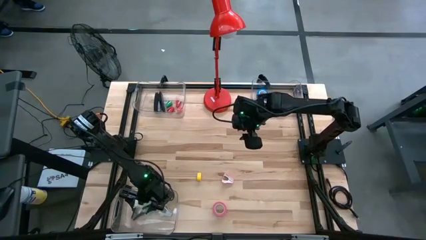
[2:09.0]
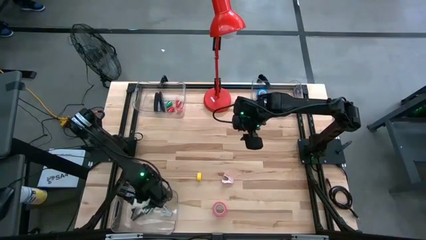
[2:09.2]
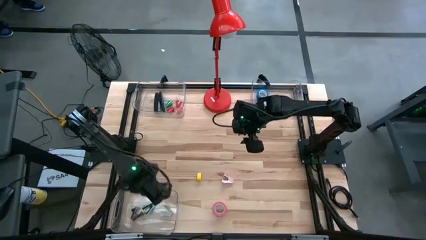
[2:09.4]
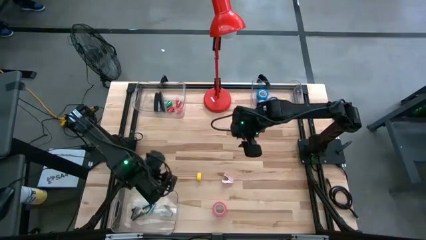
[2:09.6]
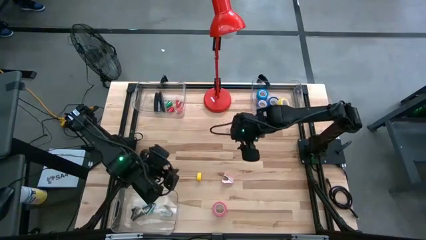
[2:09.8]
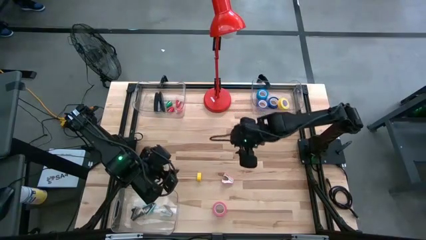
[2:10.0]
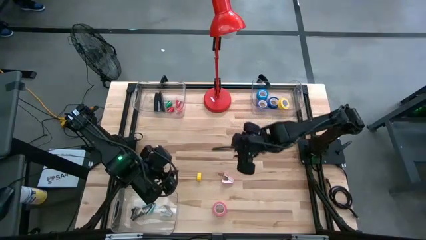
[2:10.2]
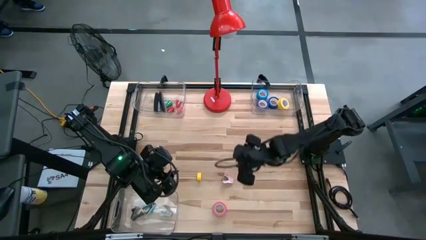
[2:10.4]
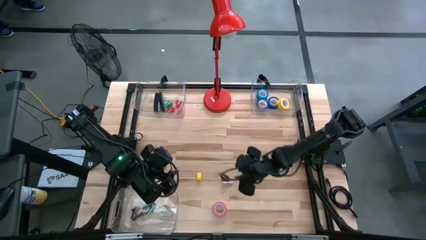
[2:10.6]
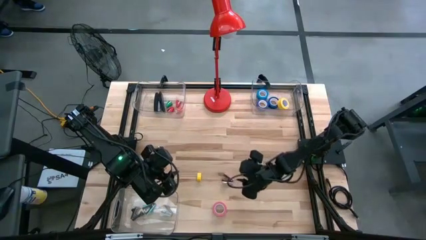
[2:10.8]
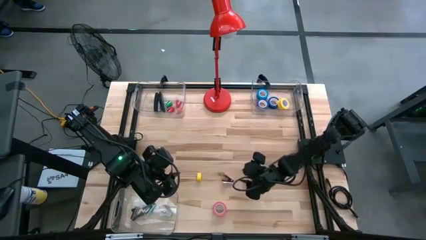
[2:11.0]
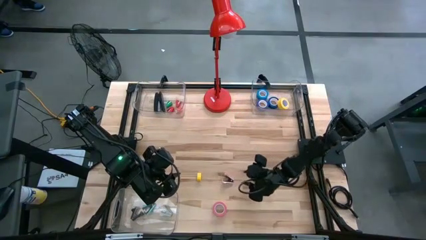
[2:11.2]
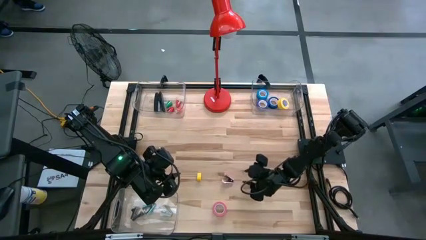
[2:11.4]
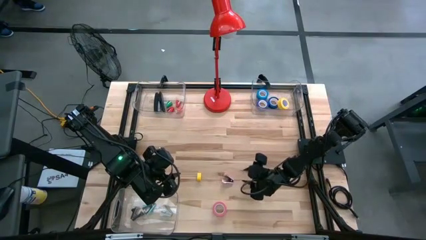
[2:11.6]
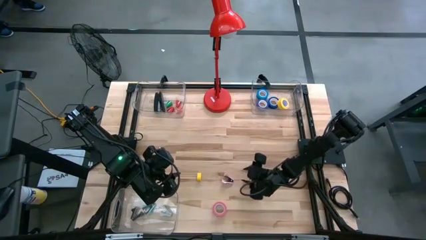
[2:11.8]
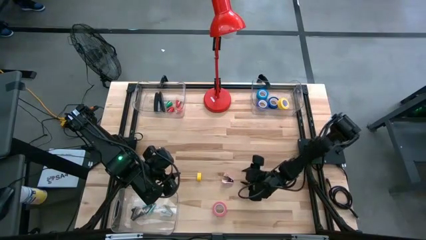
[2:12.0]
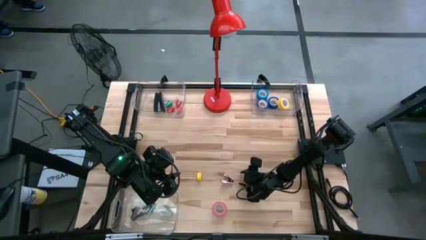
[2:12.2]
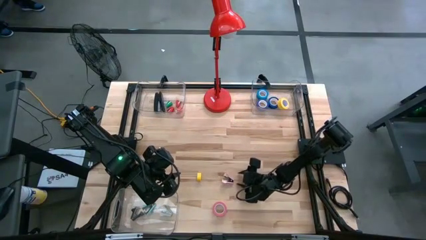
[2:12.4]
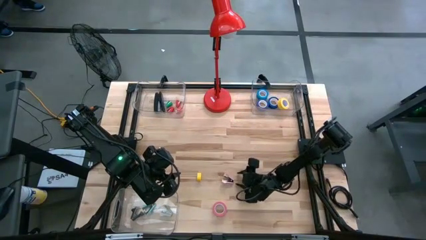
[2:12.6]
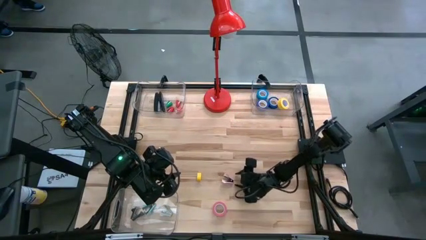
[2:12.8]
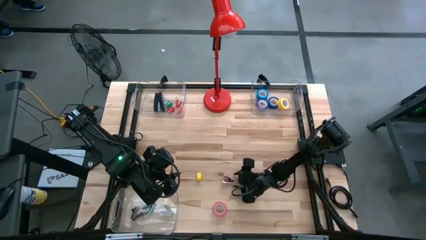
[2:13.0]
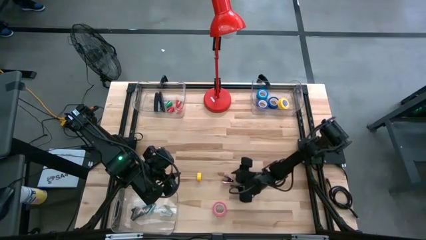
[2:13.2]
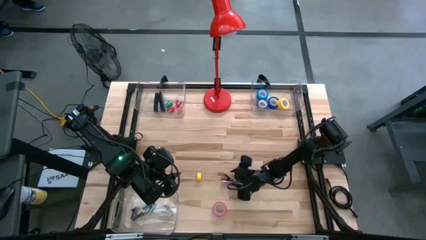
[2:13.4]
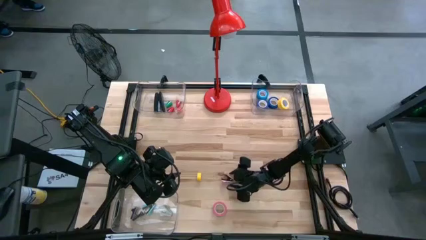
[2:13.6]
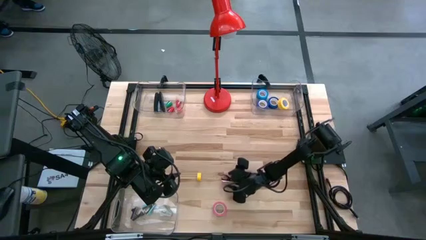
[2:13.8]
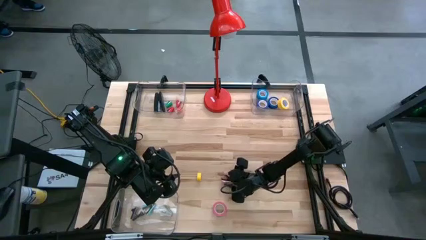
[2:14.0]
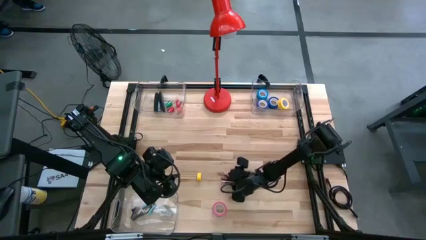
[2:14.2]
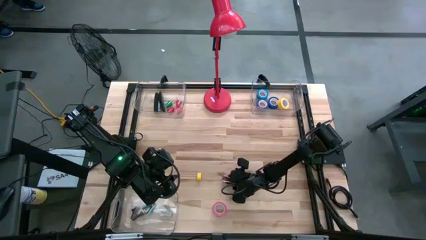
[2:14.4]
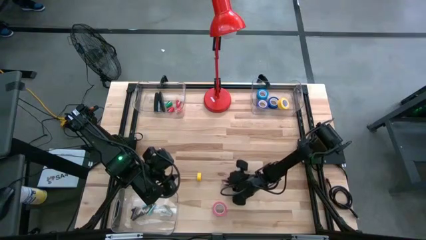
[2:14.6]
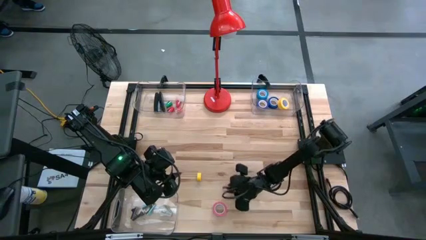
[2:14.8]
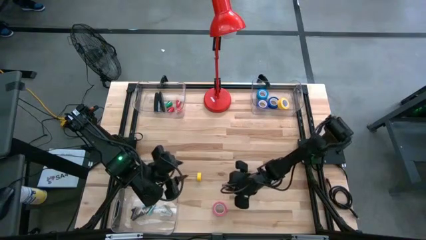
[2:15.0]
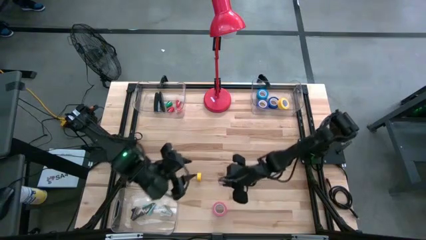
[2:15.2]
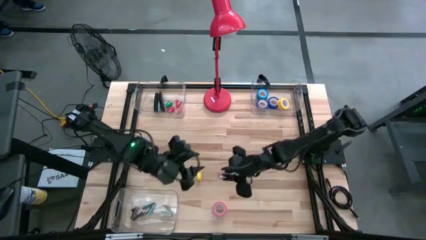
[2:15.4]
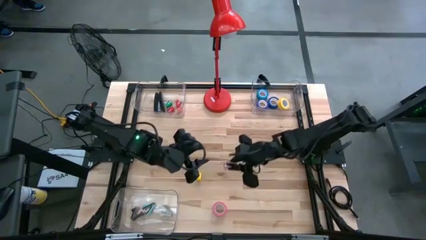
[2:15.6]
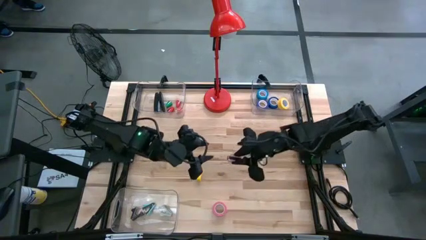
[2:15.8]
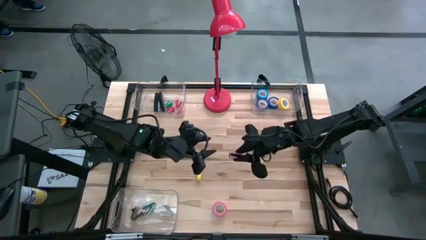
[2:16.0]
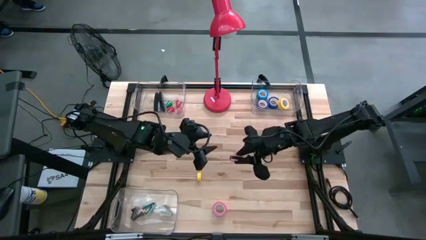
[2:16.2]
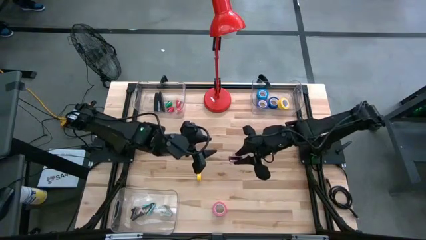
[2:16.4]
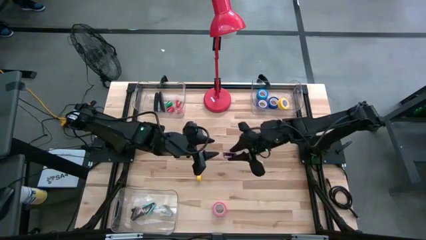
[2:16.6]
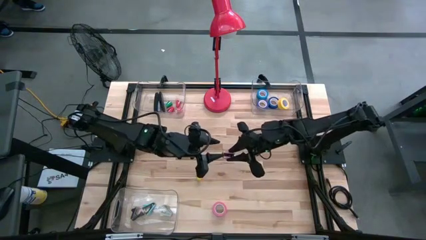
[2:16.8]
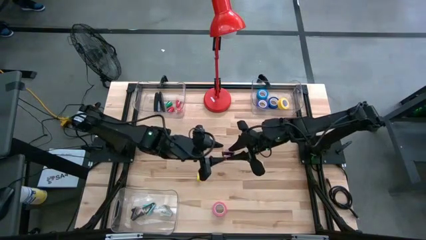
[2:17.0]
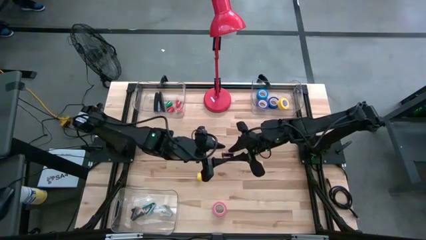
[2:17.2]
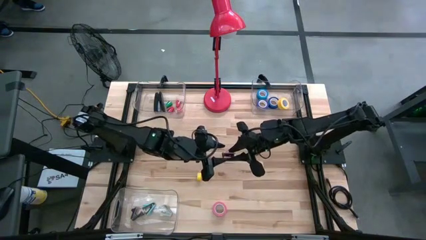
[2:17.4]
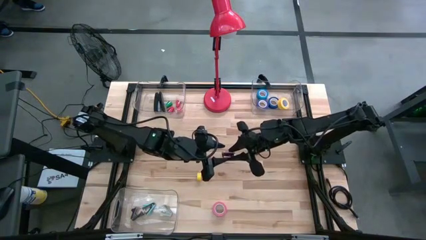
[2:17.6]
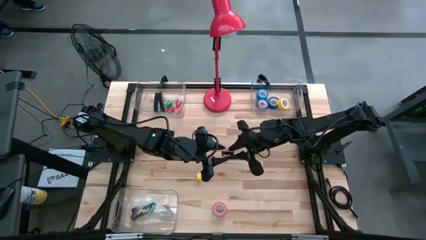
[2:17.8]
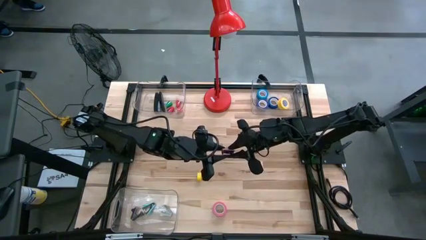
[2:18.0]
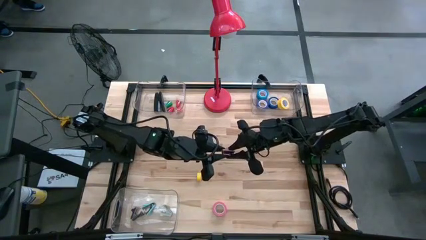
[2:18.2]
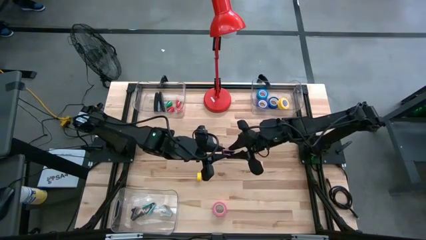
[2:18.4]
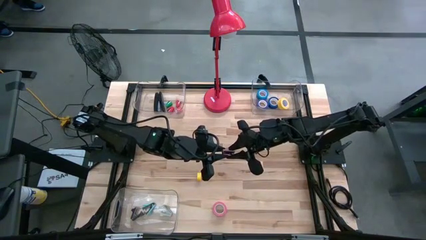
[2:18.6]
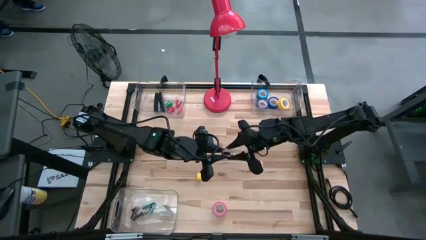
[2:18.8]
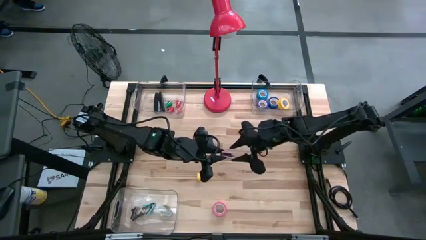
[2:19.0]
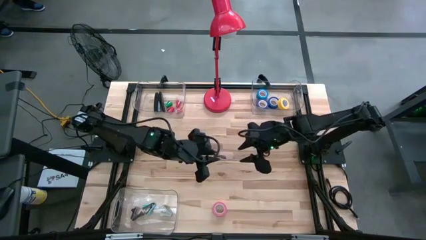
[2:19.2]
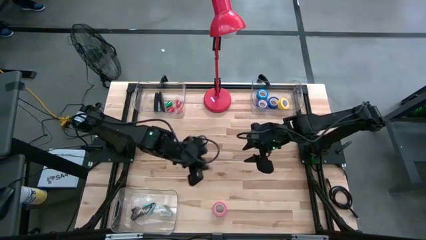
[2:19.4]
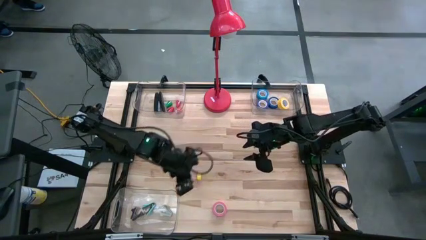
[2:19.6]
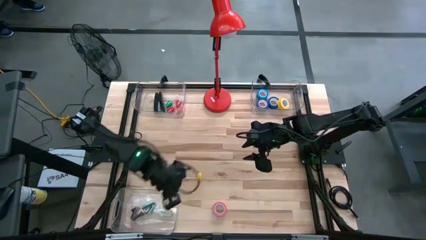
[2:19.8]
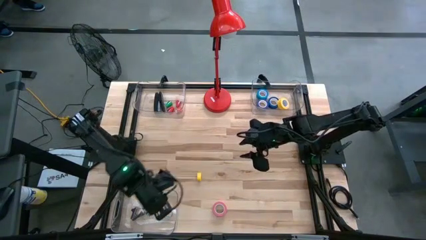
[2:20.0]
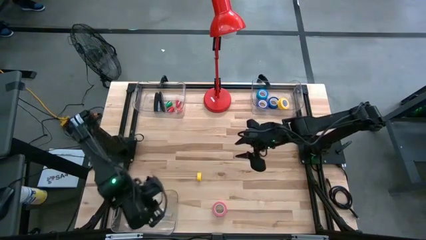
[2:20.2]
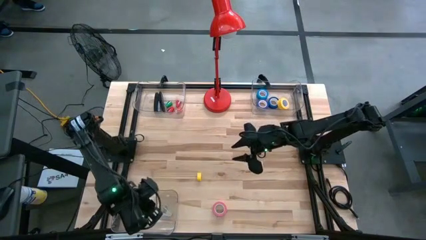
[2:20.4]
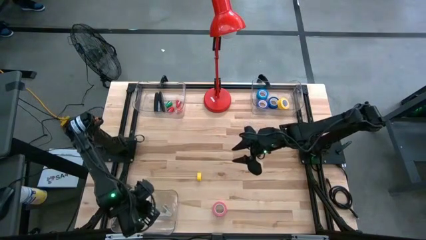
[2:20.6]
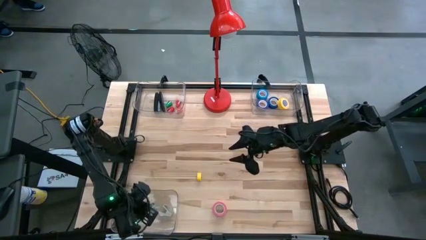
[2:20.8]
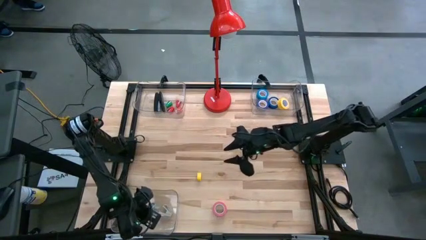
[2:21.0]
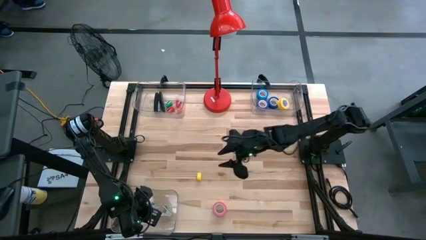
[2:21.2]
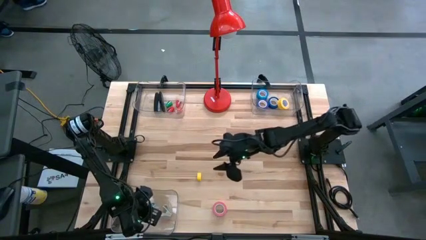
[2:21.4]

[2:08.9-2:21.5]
Task: Pick and place Stapler, Stapler remover, tape
Put the pink stapler remover into the bottom transparent bin

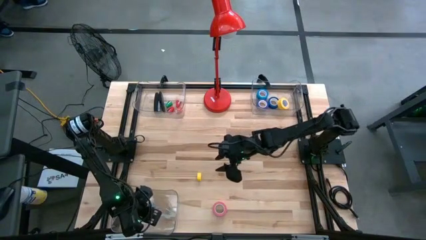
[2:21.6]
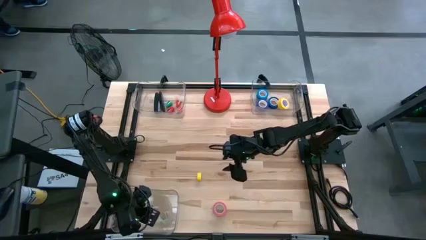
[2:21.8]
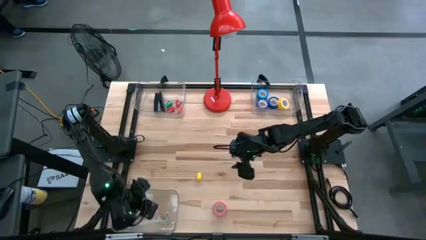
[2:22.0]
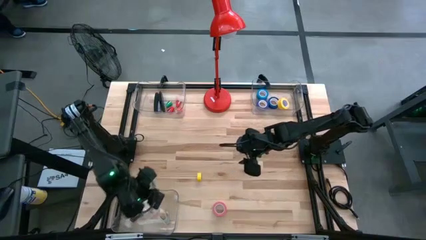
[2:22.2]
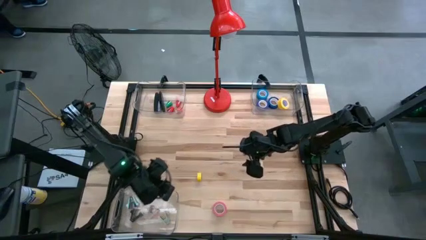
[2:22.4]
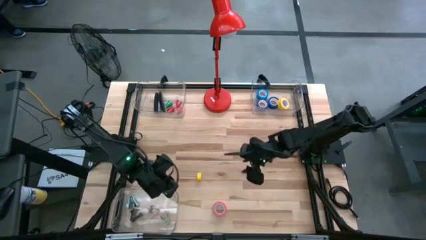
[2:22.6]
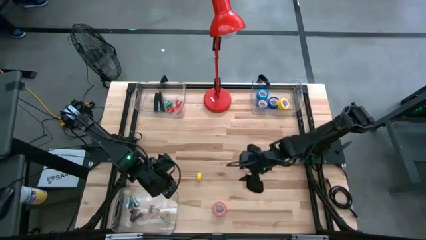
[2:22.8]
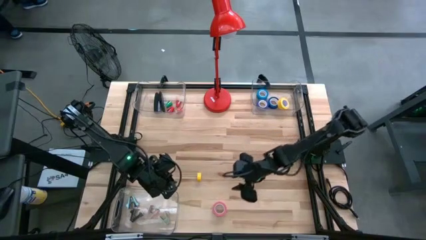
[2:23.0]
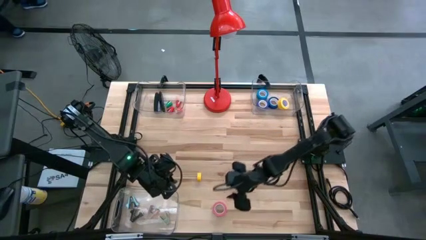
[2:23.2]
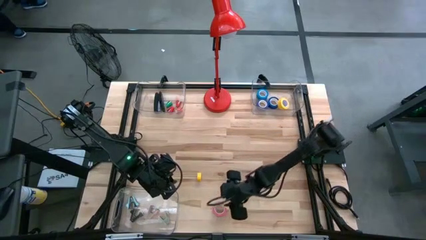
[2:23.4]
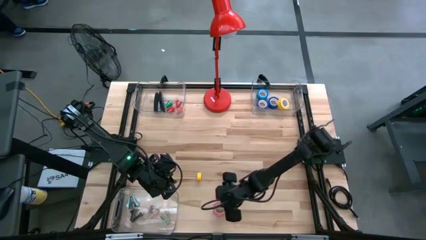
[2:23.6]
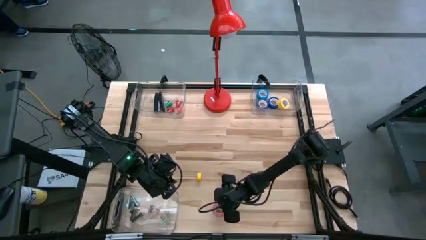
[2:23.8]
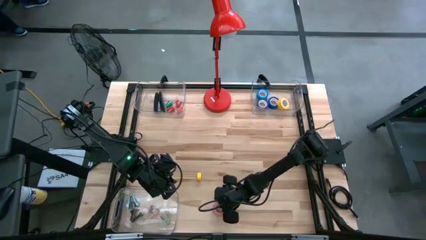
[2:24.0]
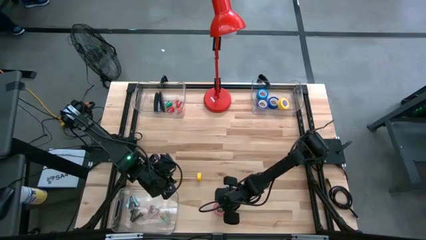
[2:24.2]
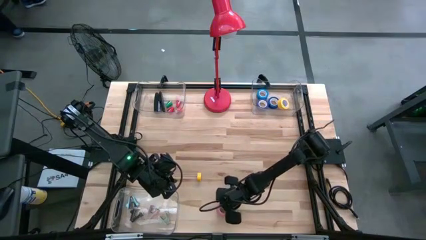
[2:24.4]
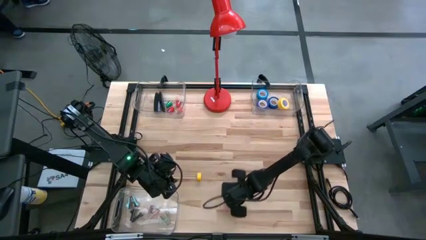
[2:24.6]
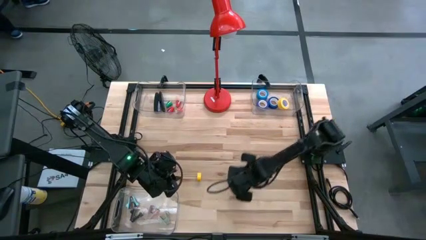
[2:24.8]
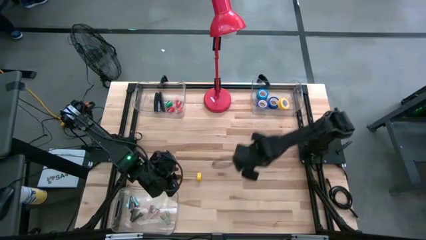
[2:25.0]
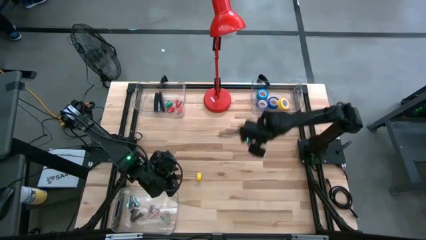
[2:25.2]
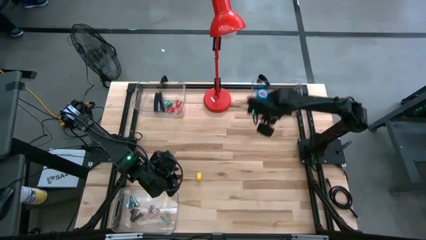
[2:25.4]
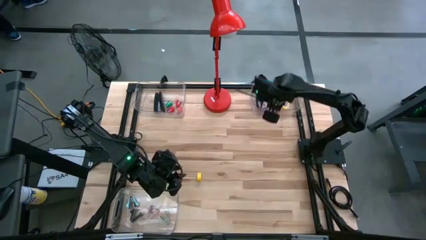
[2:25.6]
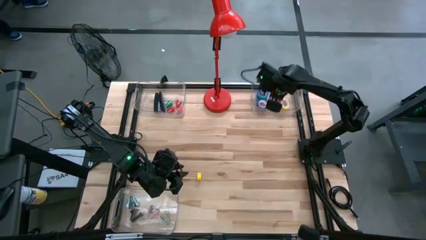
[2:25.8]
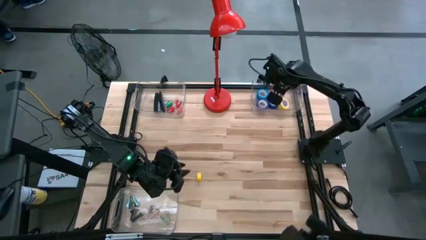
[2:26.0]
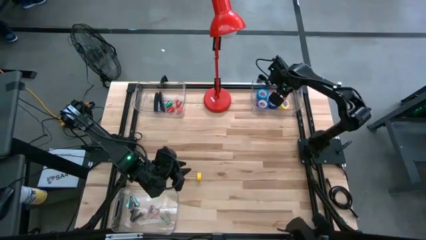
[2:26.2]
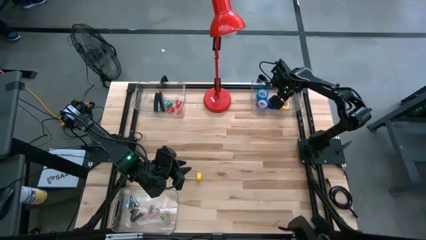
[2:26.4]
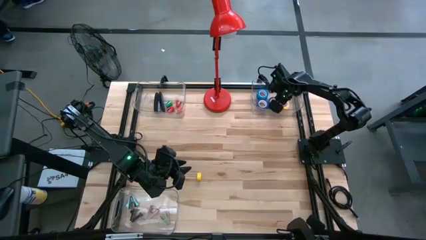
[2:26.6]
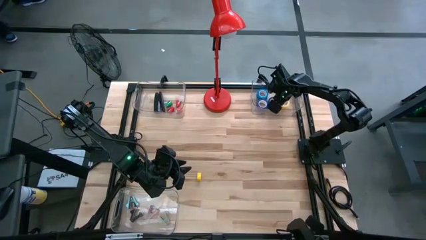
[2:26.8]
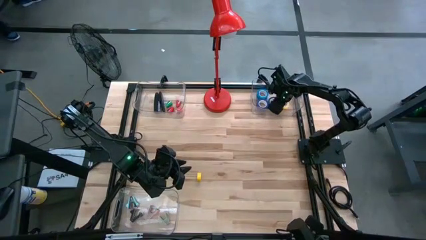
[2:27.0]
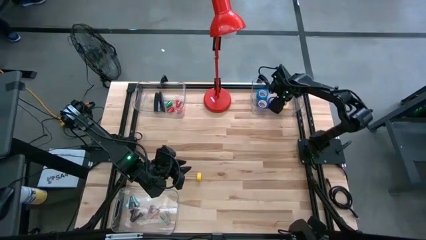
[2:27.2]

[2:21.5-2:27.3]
Put the pink tape into the top right transparent bin
